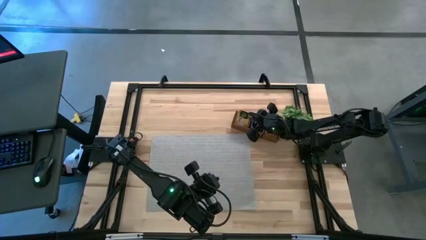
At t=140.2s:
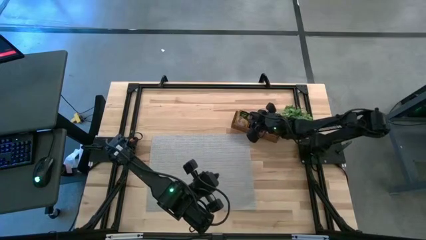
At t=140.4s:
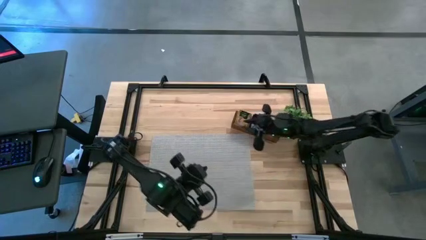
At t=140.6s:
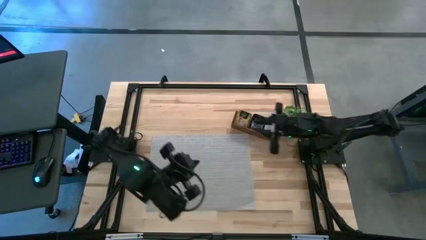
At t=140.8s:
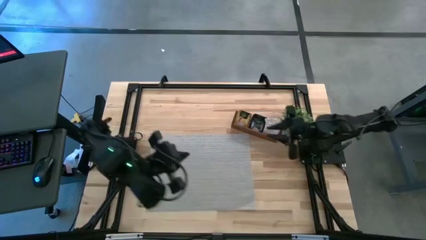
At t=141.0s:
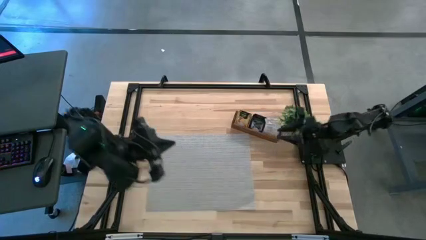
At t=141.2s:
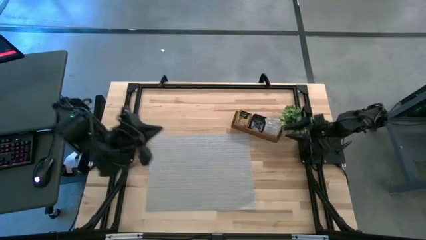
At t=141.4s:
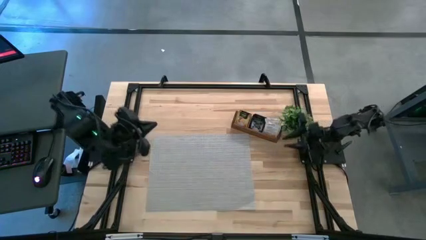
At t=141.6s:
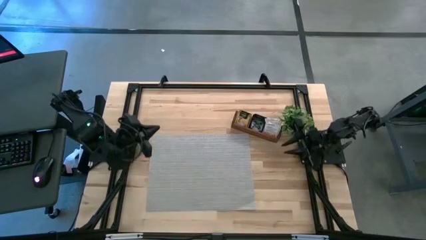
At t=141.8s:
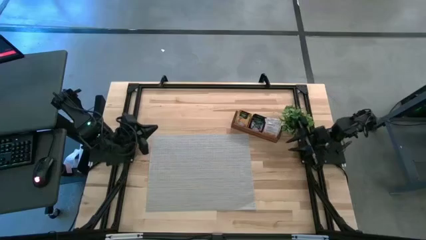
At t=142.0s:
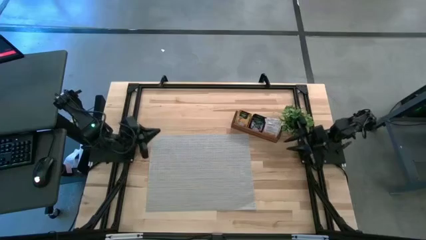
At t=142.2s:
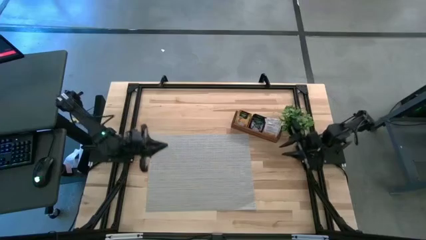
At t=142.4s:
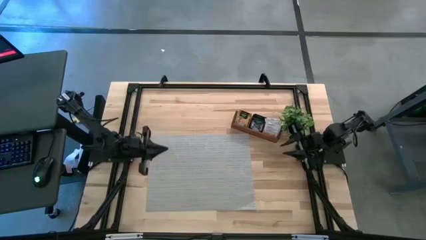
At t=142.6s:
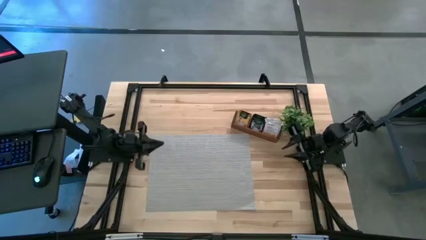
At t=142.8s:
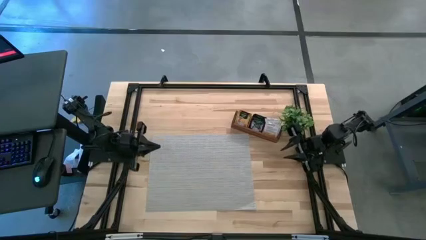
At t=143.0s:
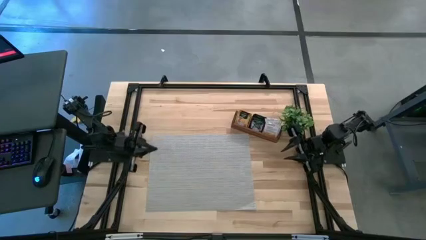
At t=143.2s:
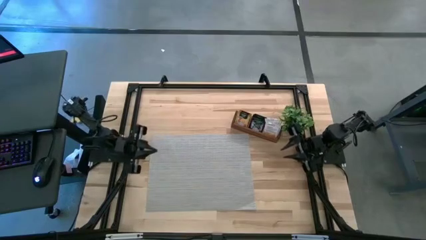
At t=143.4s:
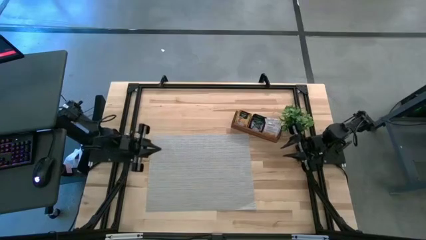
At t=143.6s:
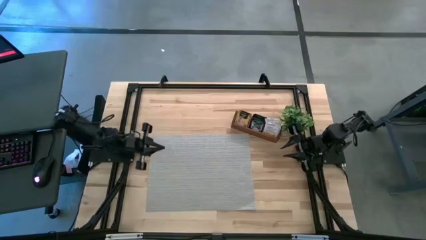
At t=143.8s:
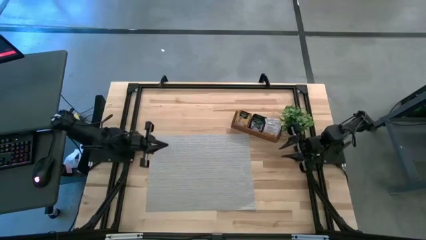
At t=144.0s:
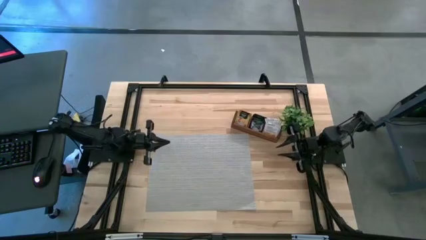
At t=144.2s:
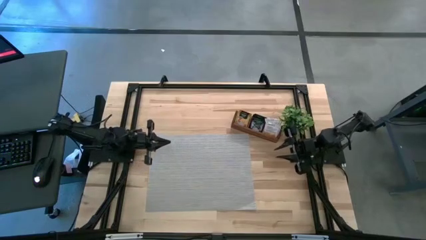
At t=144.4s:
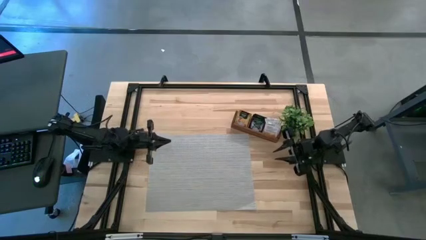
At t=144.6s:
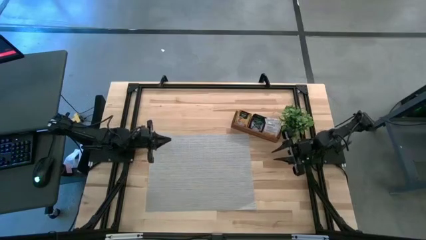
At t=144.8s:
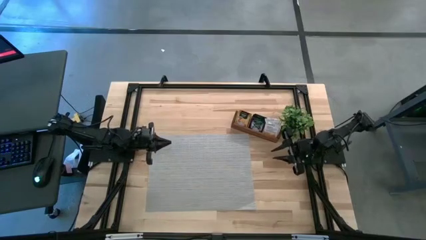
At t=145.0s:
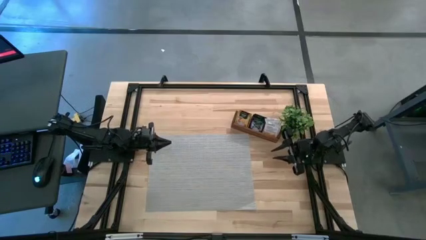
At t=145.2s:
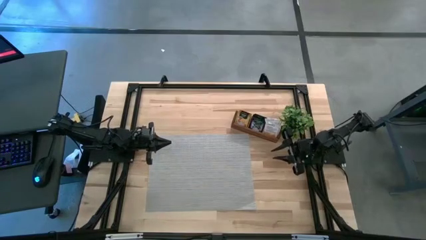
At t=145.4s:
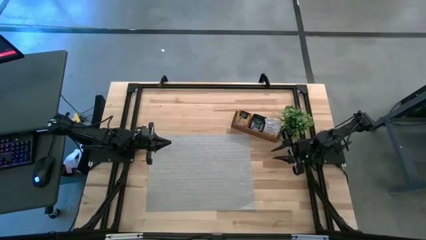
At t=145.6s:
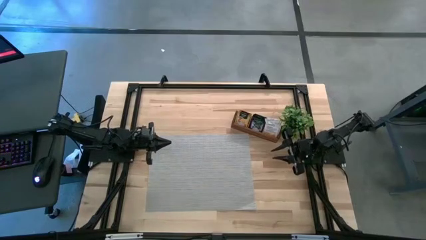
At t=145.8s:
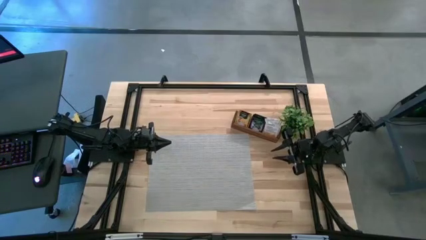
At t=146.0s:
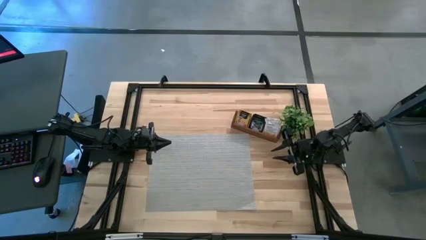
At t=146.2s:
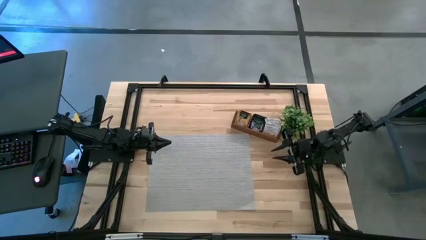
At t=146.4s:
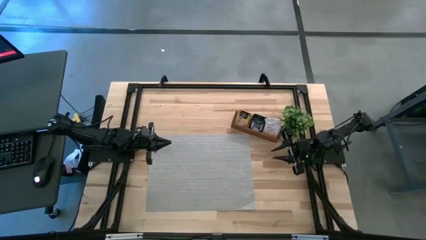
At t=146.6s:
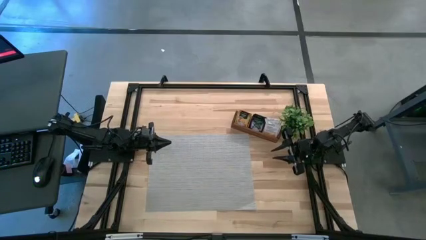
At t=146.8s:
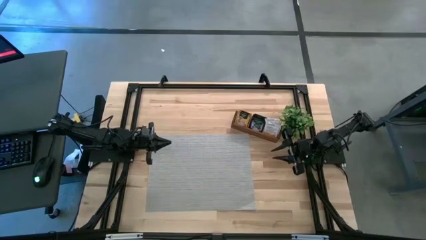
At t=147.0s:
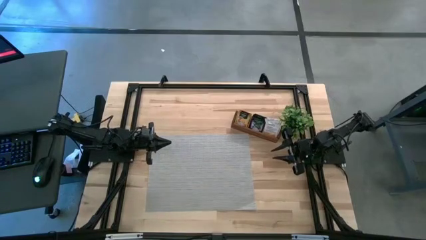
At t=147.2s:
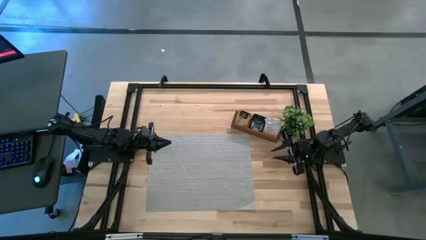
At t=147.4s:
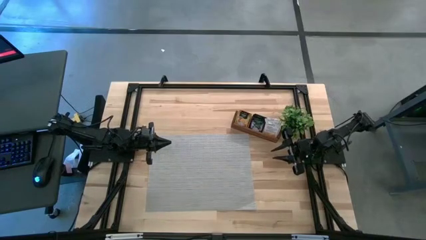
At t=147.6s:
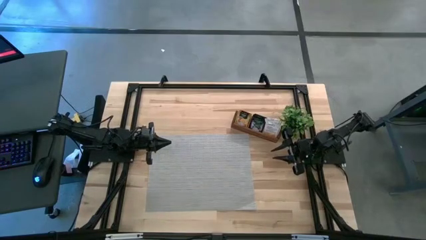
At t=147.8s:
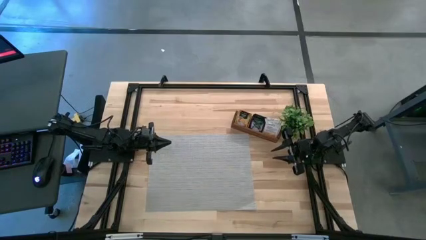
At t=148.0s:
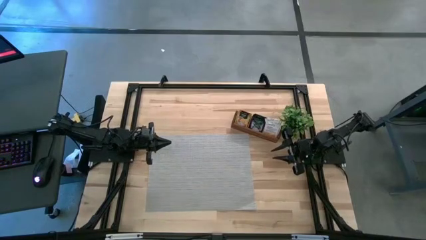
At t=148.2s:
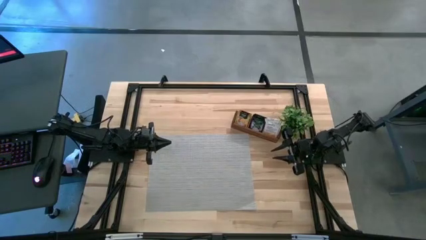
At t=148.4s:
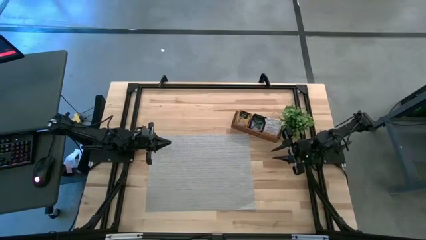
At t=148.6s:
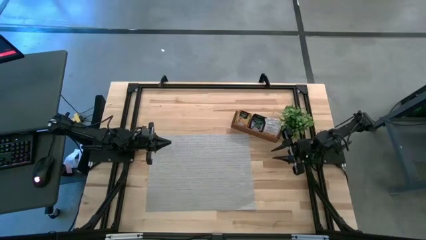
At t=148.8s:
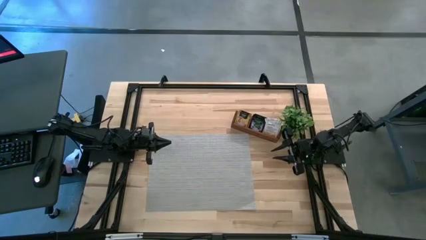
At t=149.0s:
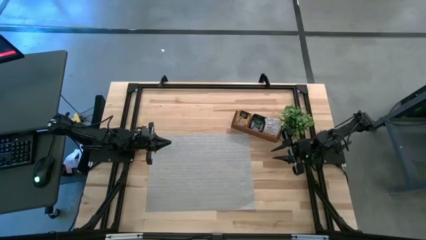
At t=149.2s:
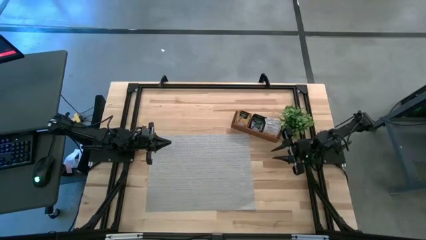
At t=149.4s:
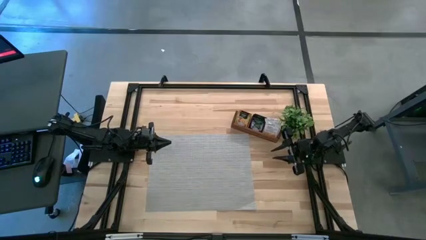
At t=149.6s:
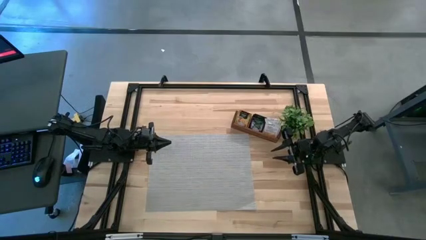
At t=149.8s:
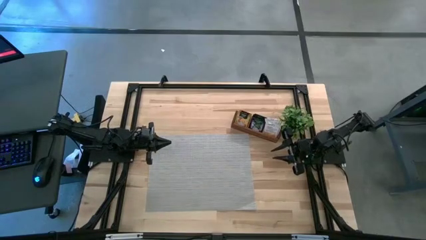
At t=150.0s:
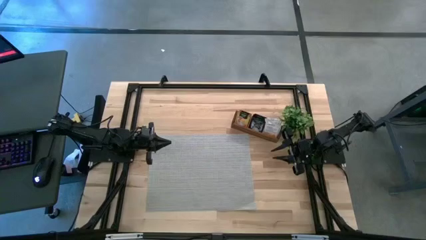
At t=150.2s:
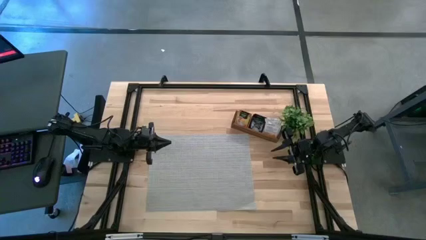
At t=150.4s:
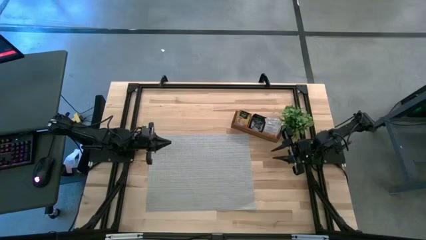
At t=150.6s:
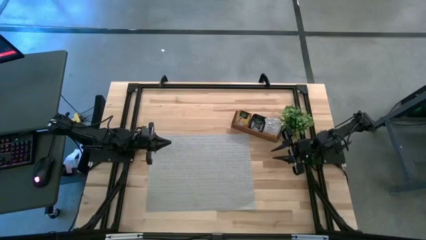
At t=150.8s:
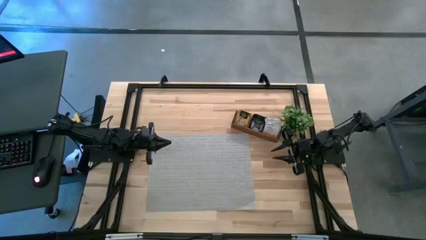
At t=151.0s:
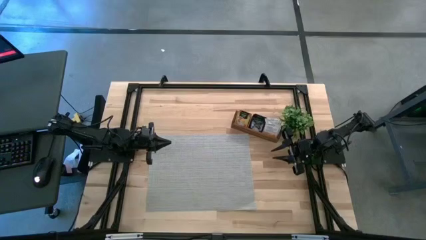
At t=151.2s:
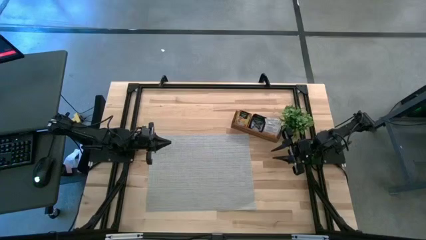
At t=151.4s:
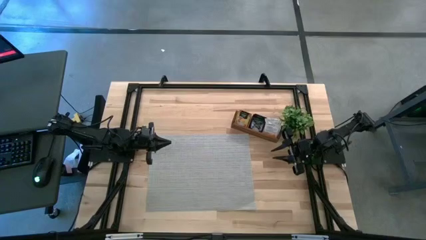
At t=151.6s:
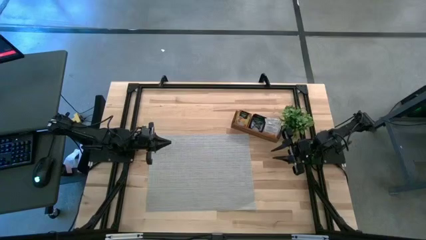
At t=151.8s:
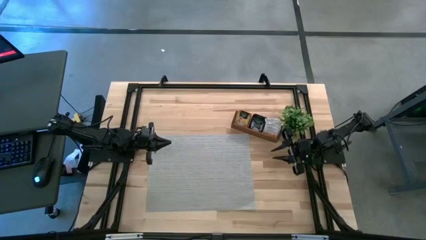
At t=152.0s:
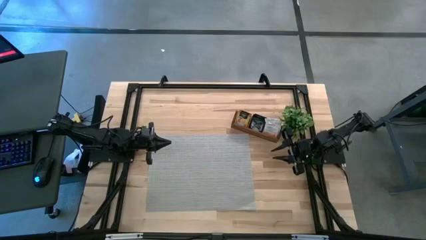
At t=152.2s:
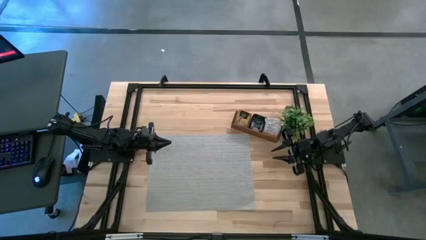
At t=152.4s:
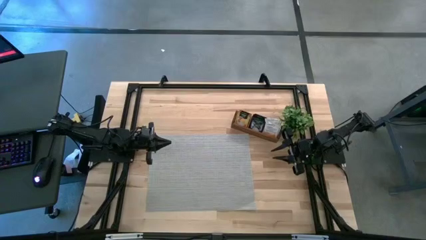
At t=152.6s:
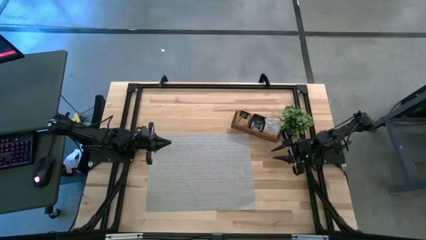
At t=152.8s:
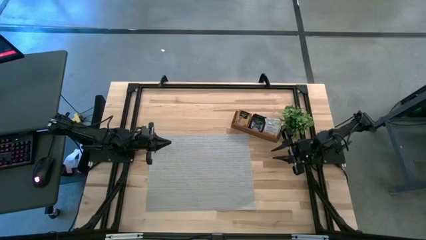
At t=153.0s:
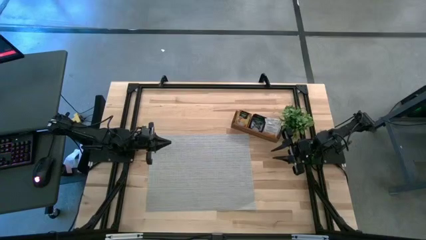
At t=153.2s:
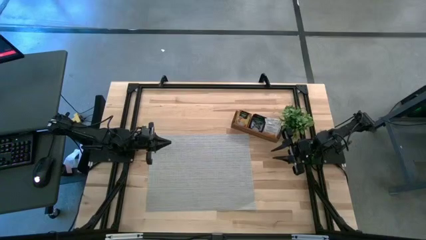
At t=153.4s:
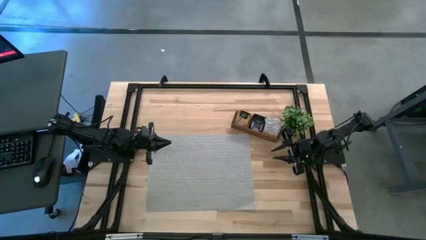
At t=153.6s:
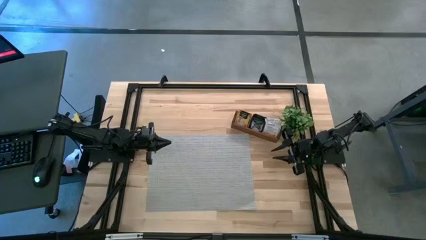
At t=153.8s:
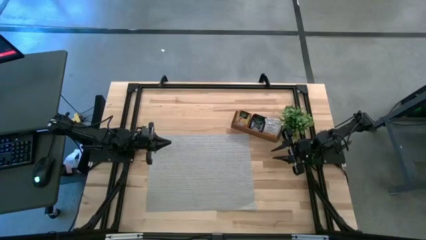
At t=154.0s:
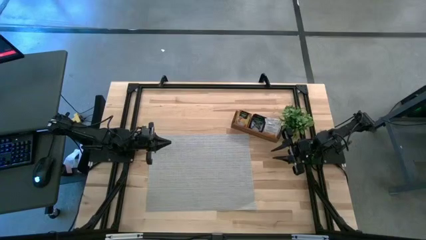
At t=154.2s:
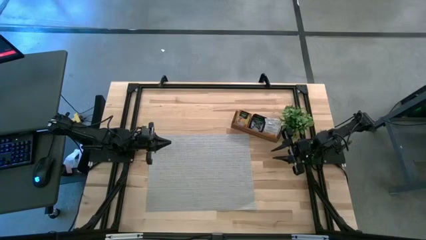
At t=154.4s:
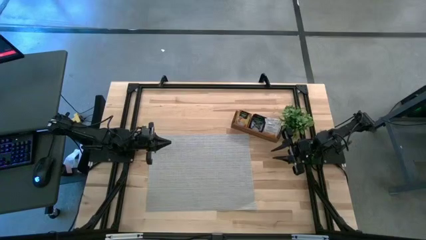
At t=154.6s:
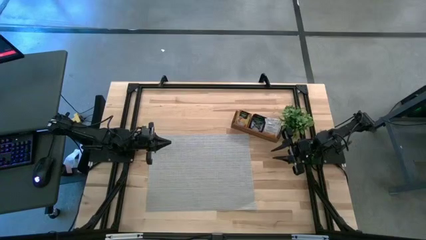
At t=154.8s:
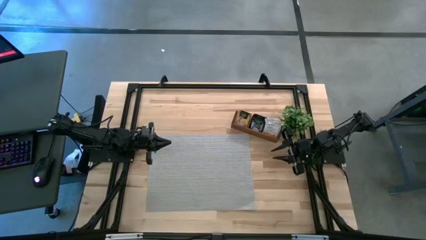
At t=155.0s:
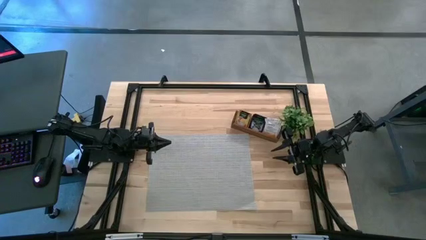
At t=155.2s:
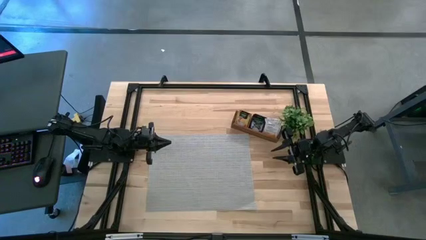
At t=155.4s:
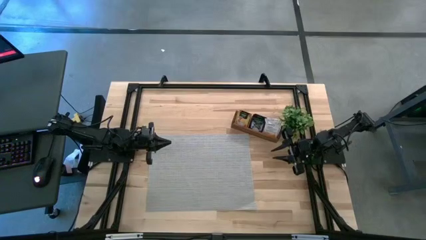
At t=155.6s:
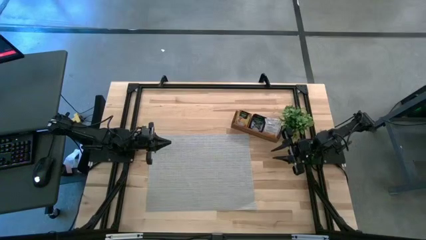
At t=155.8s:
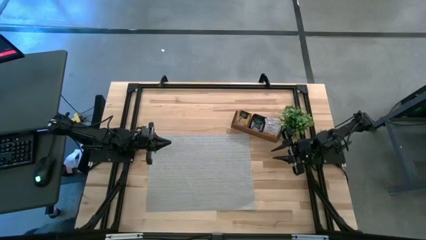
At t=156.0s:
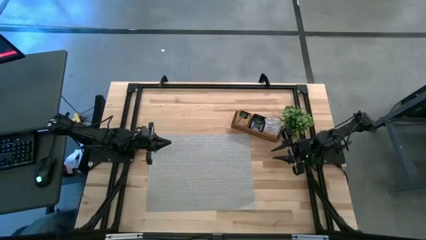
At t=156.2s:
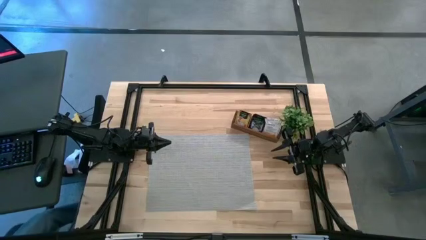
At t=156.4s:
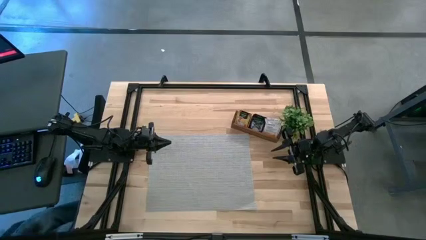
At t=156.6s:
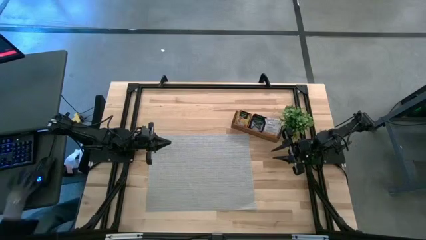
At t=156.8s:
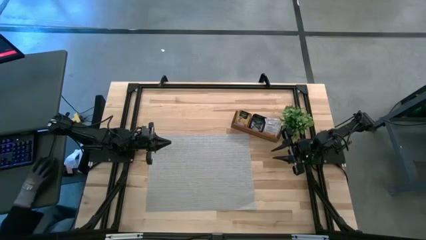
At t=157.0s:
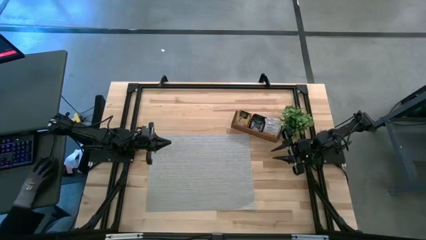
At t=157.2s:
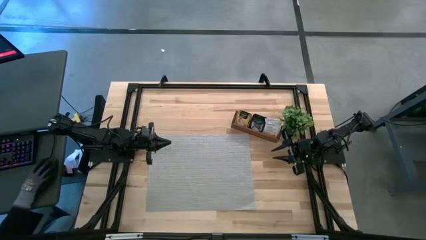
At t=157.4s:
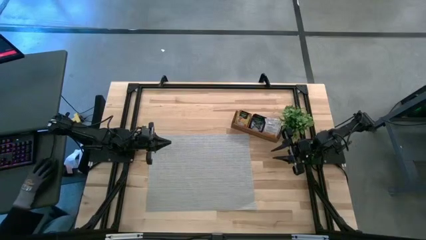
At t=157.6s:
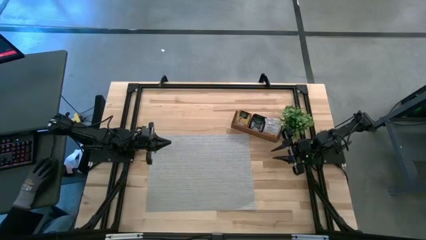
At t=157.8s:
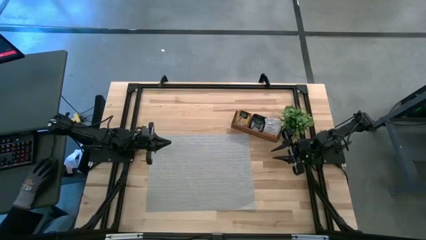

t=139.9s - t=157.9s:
Task: Pick & Place Tea
Return to Home Position
